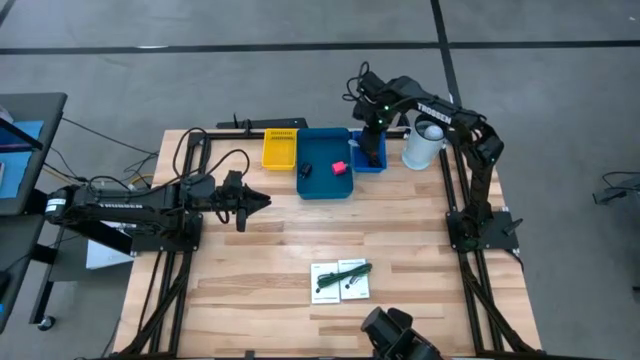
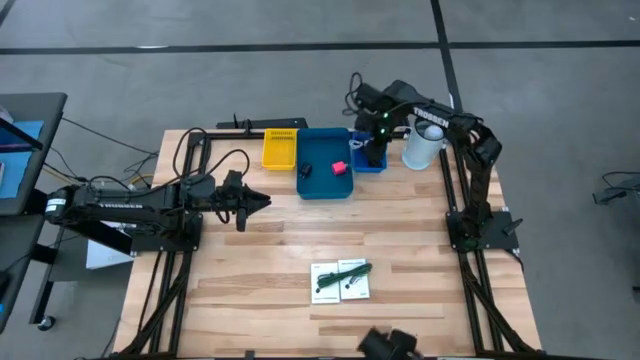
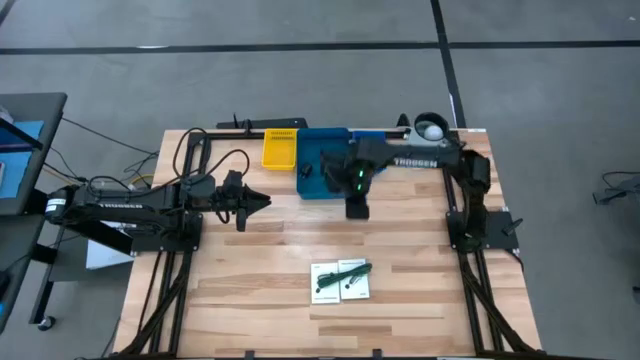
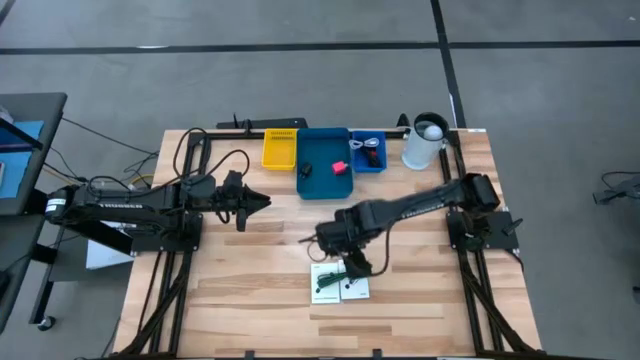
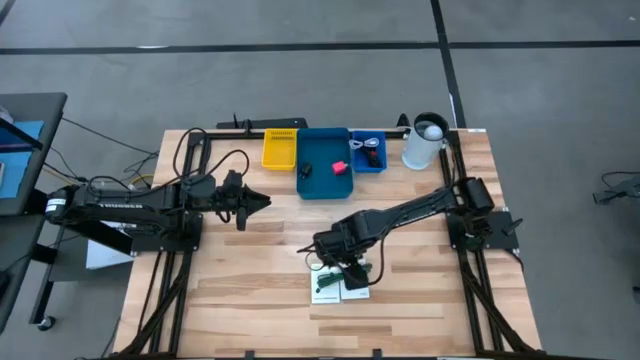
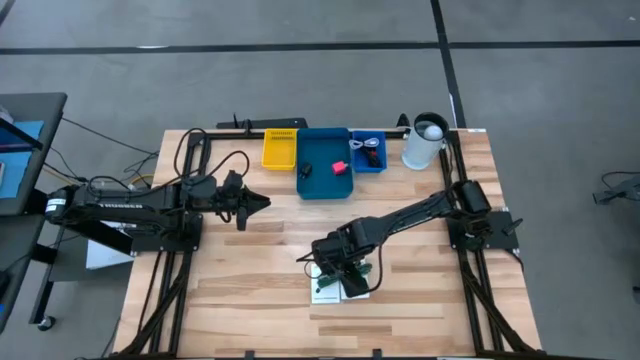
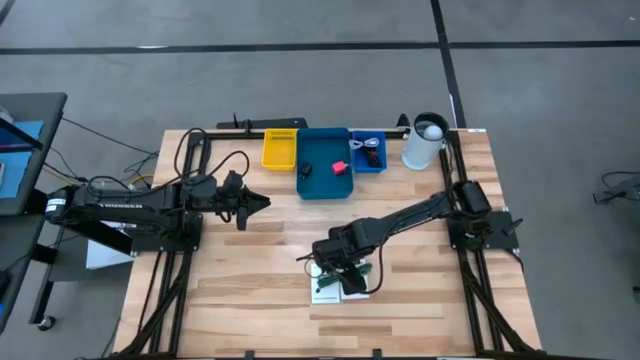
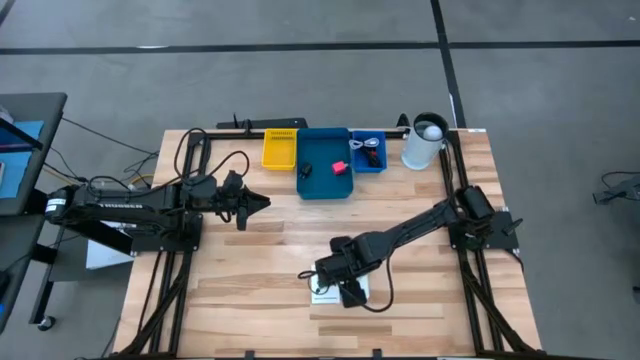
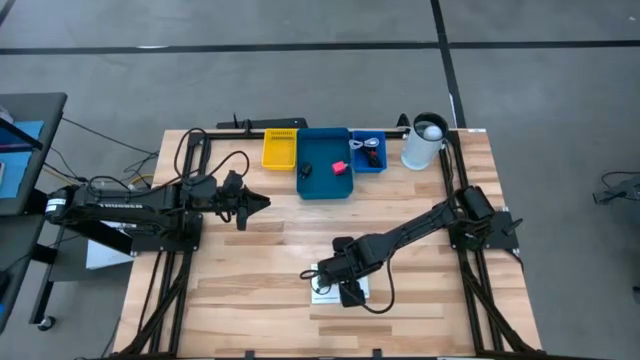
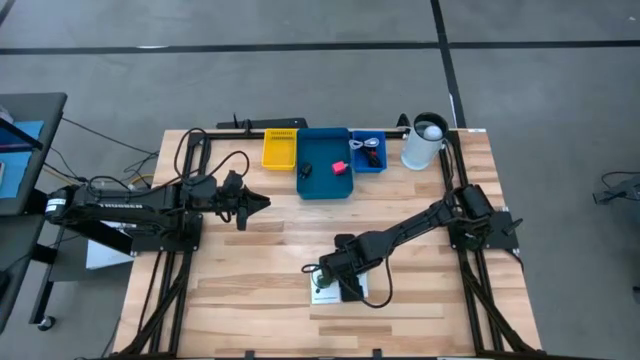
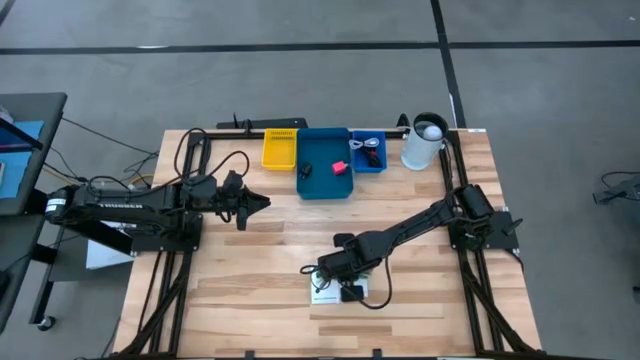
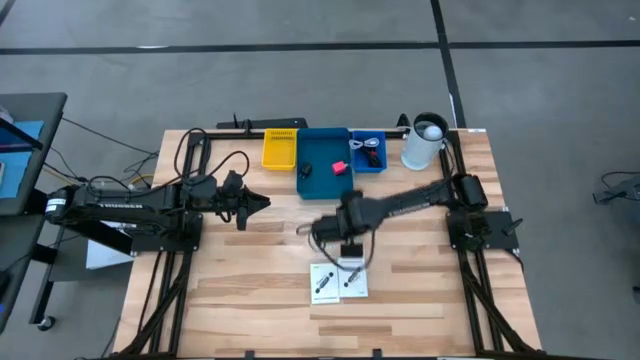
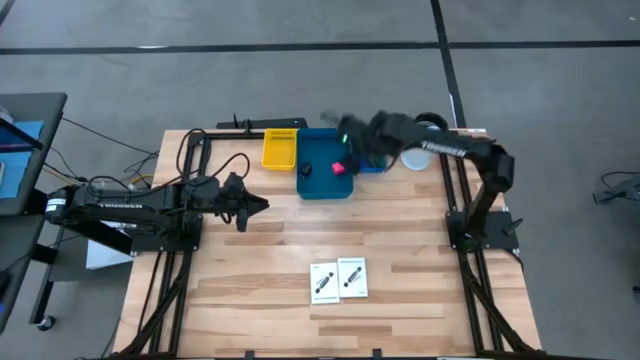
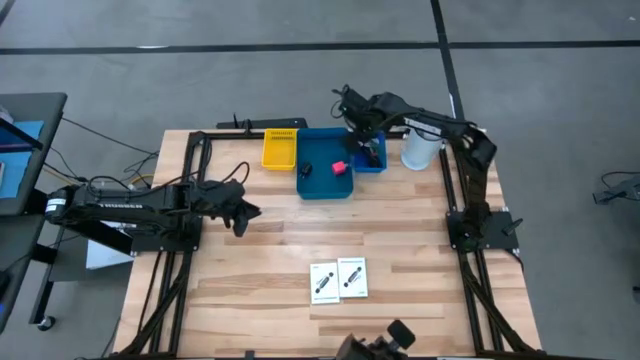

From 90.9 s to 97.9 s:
Task: Pick and place items into bin
Put the green charger cable into the blue bin

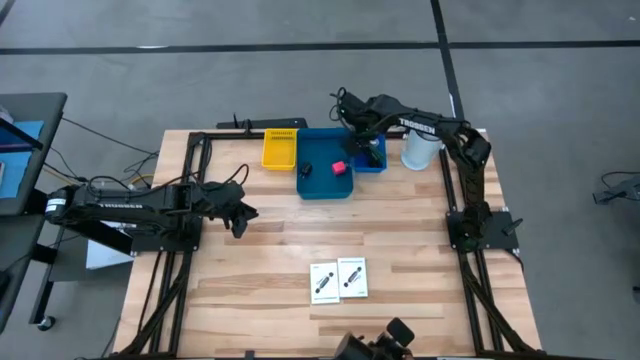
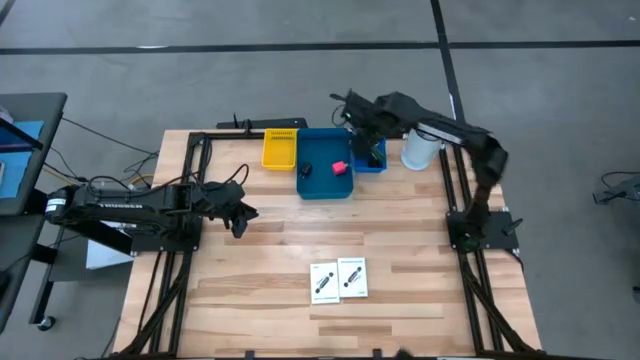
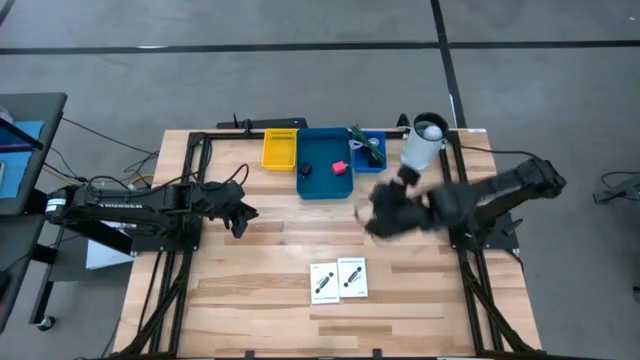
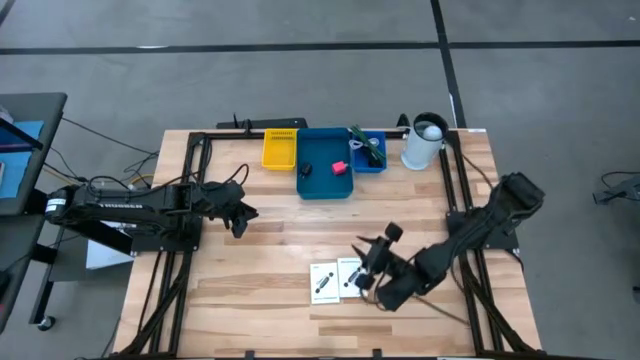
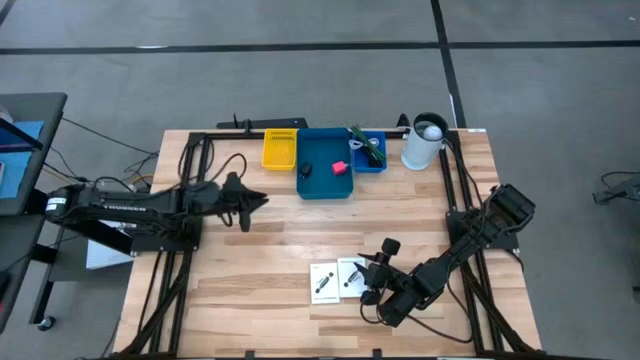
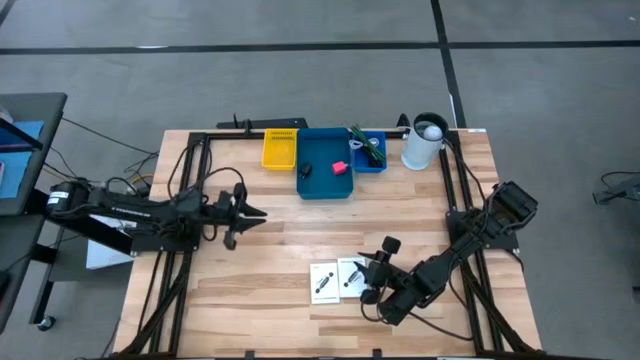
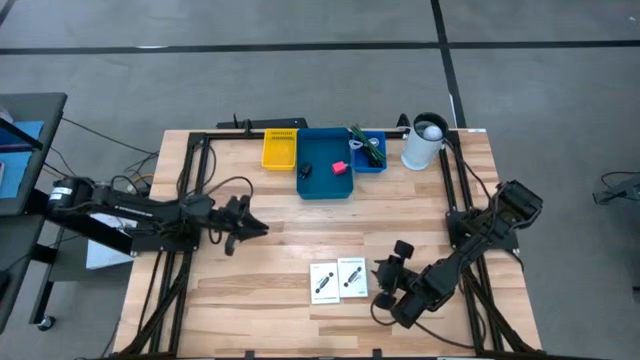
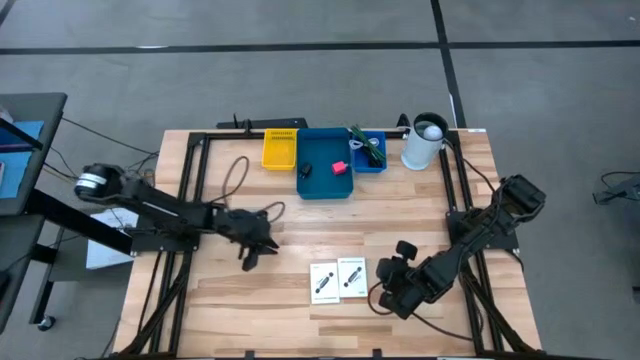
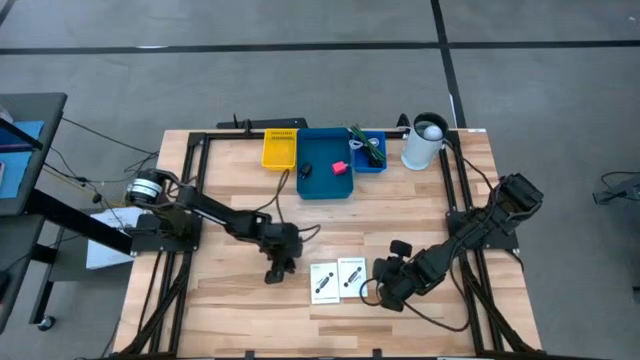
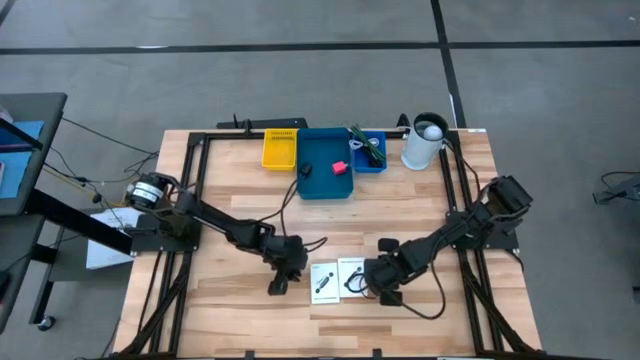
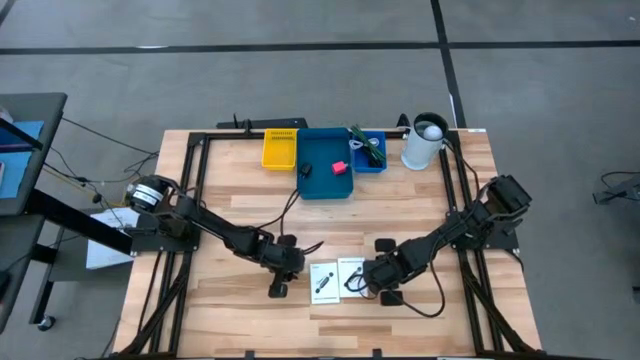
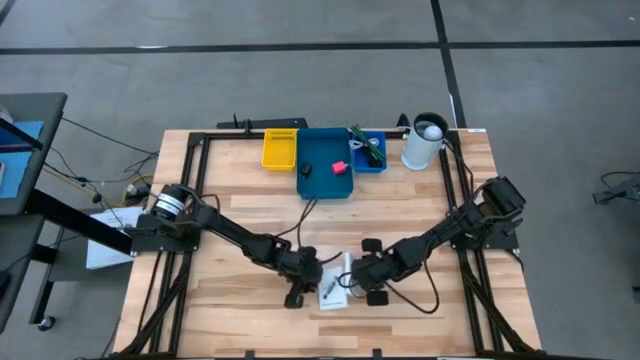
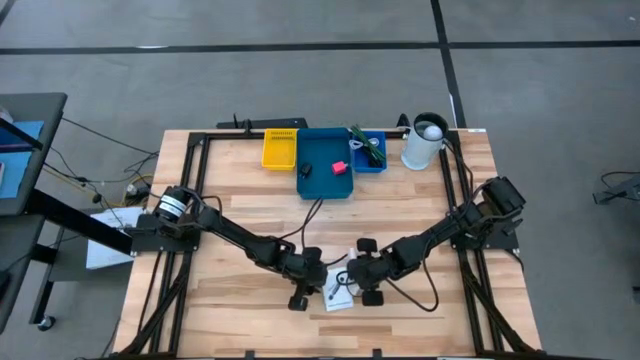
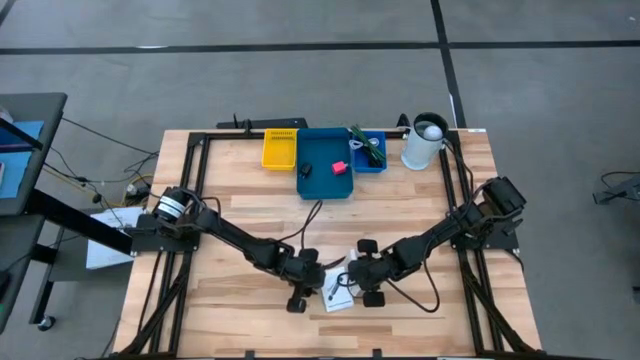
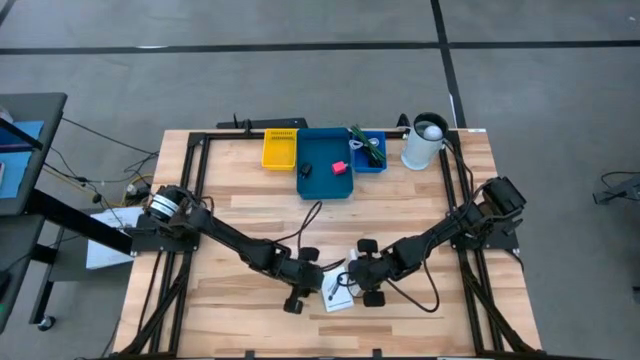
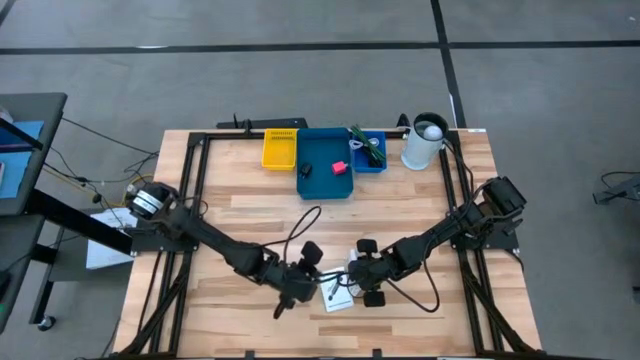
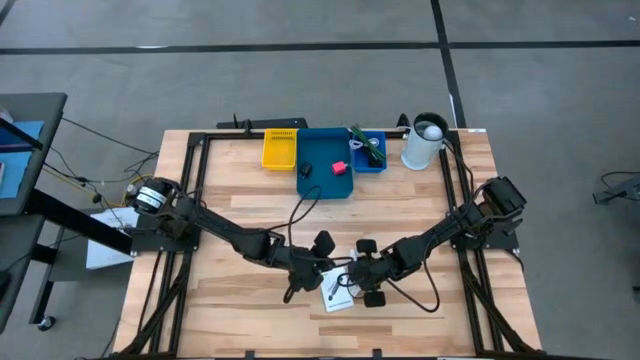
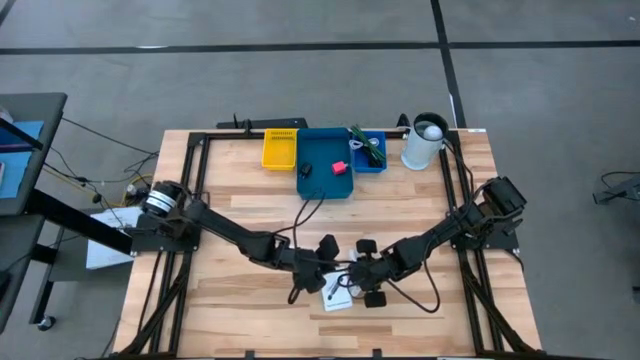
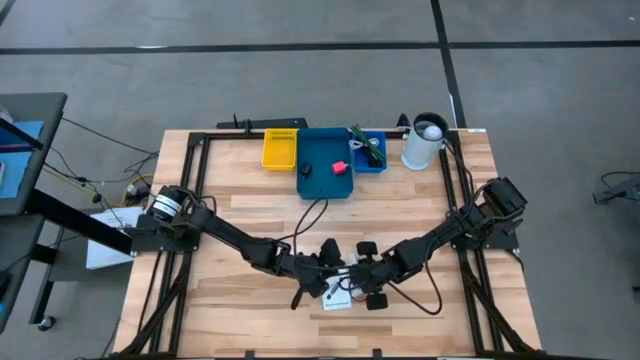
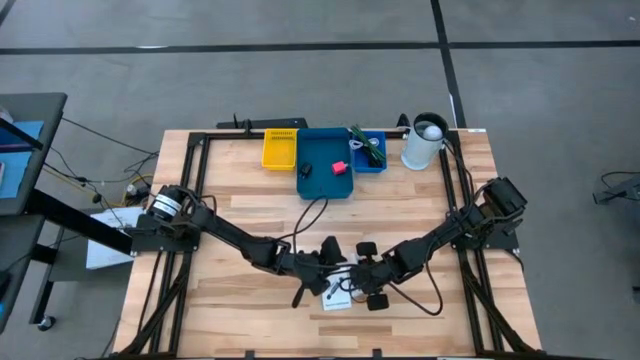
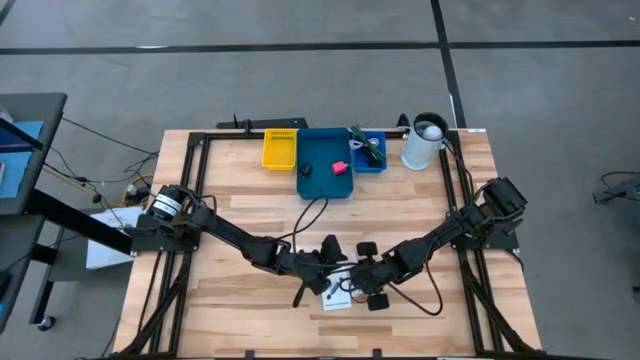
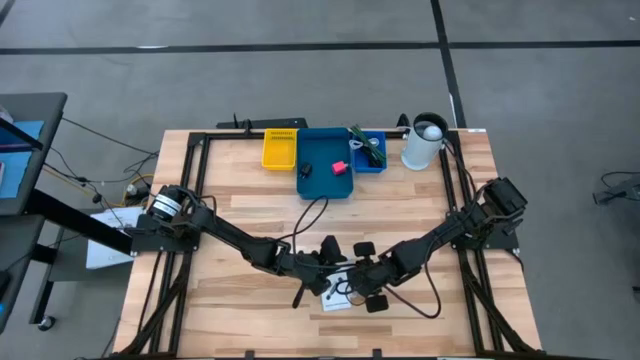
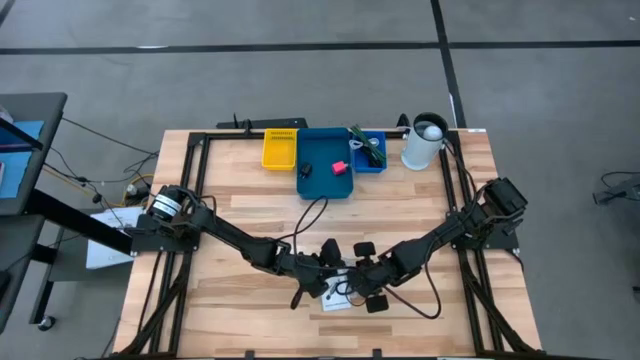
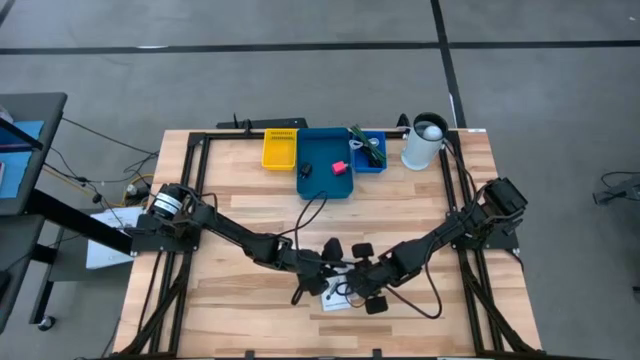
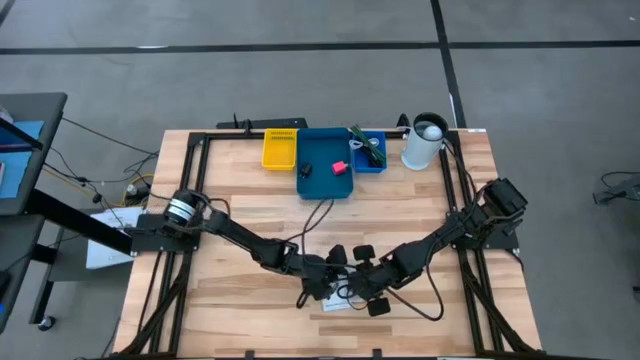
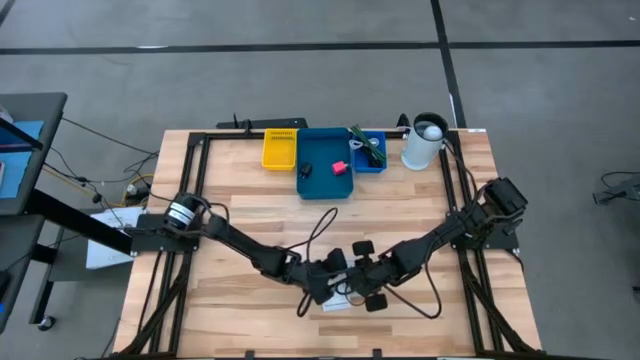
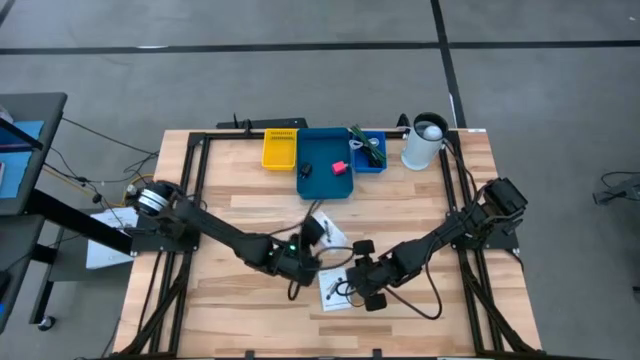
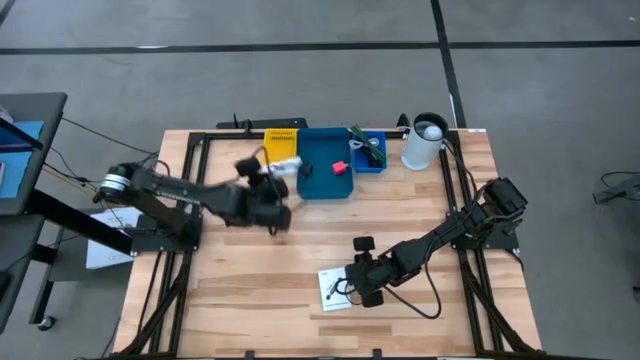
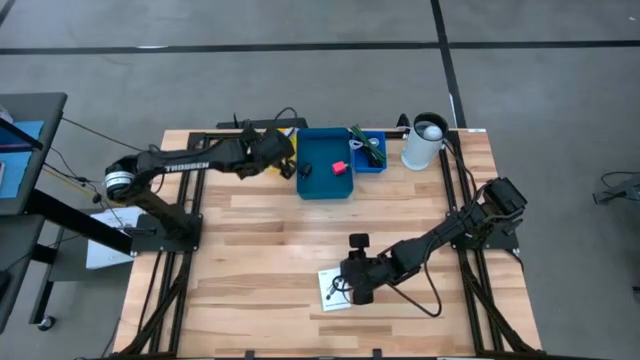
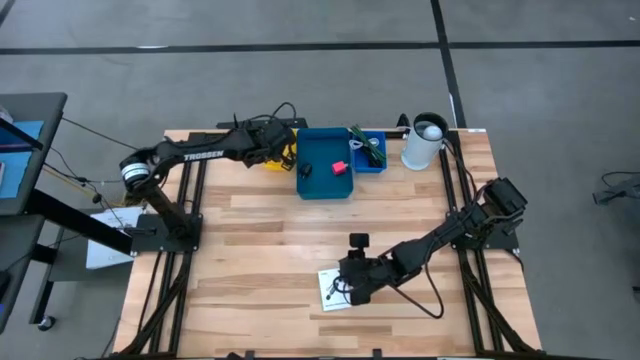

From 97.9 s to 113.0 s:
Put the right card reader box into the yellow basket
